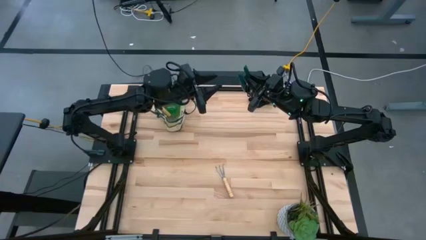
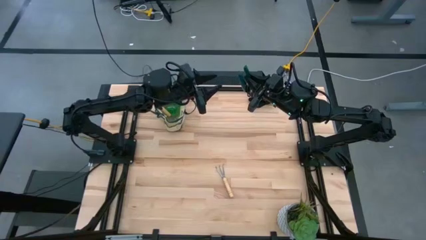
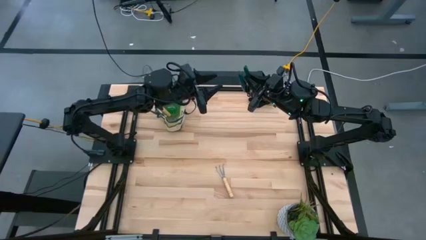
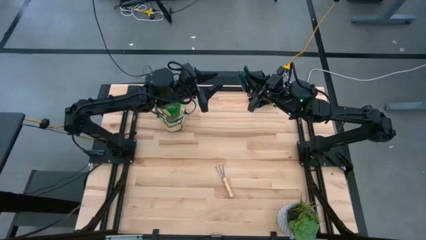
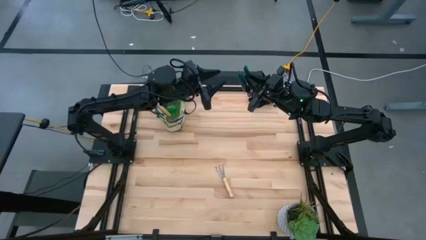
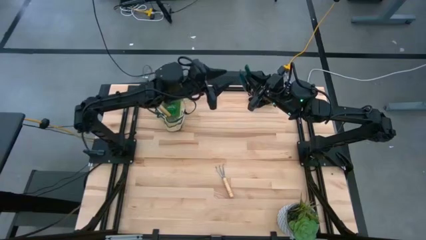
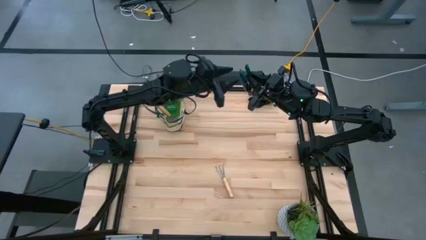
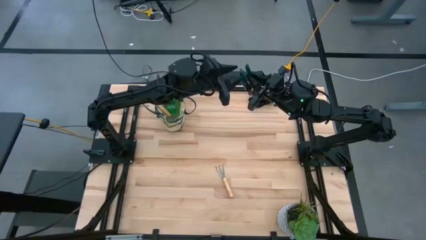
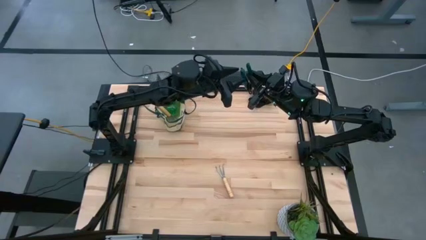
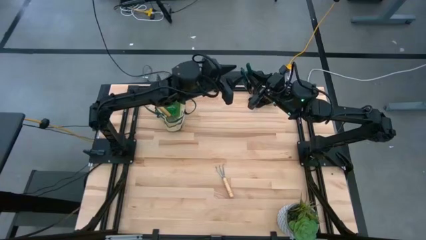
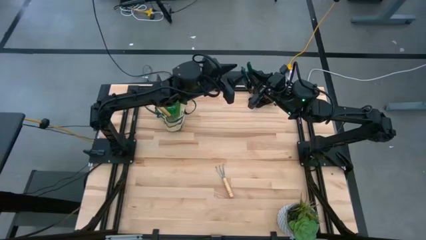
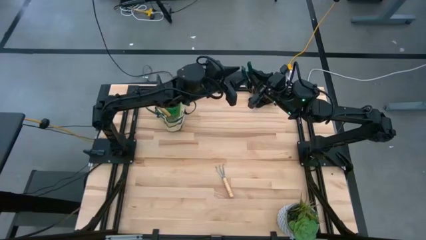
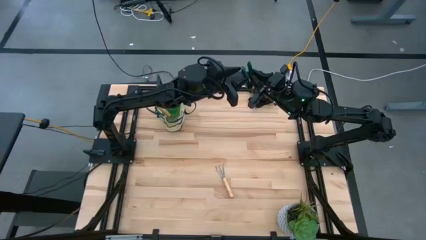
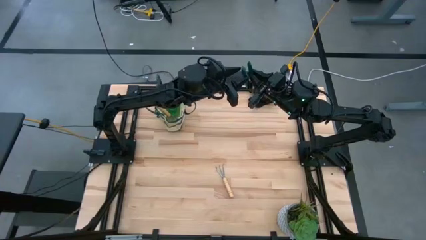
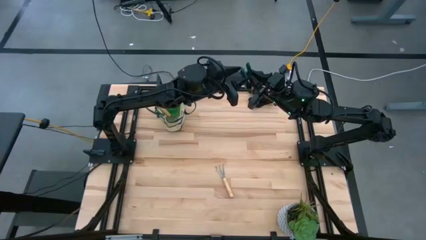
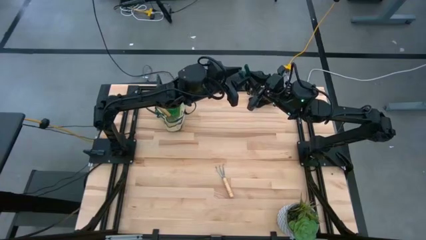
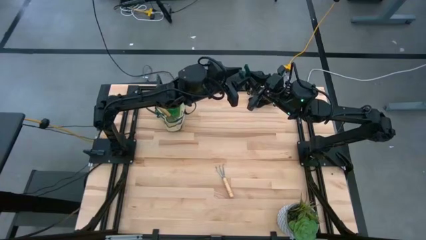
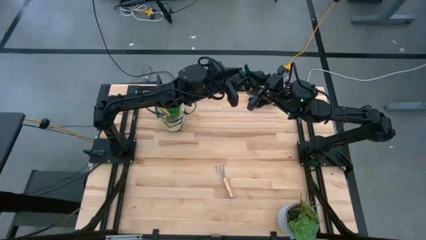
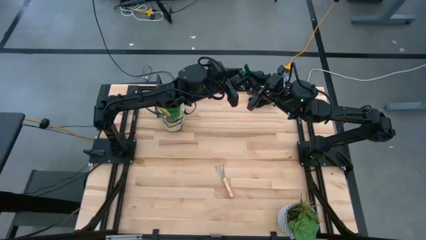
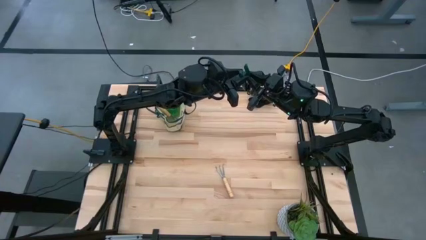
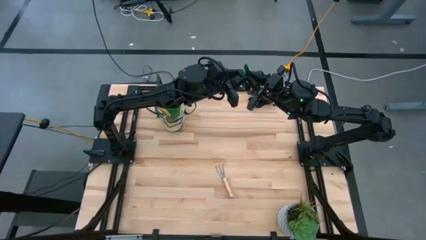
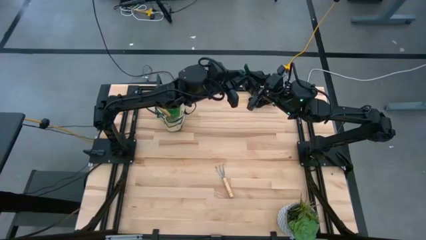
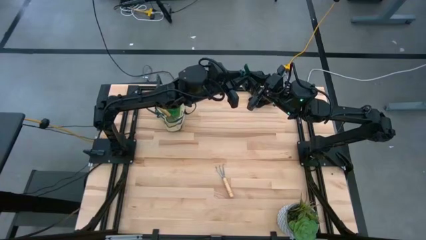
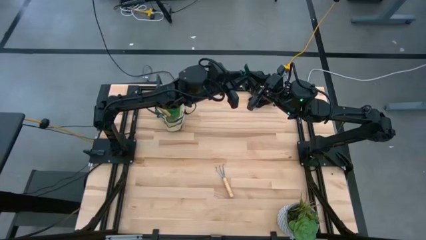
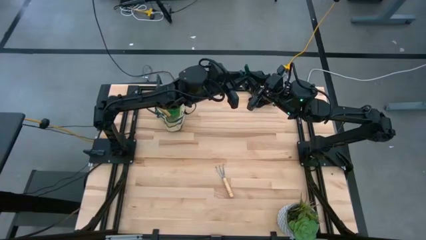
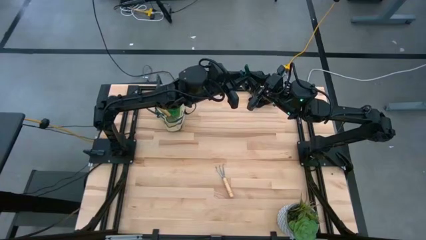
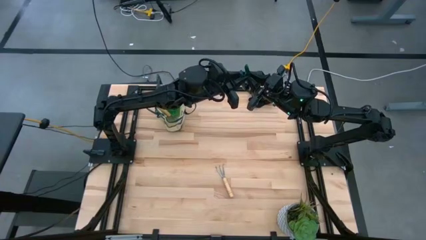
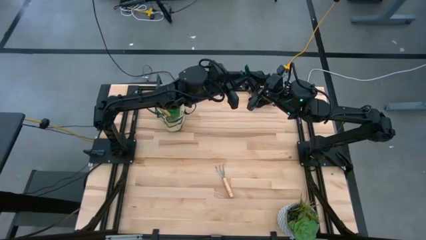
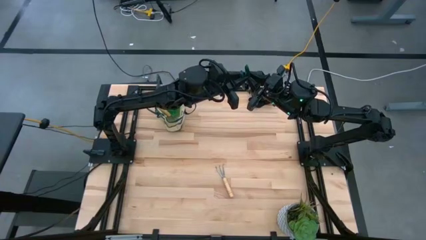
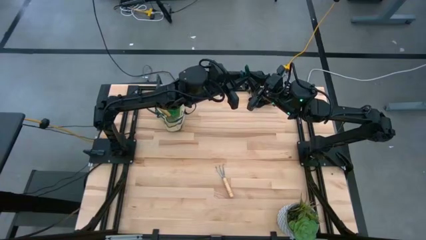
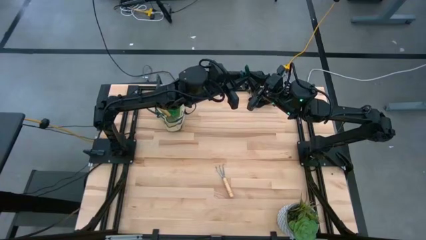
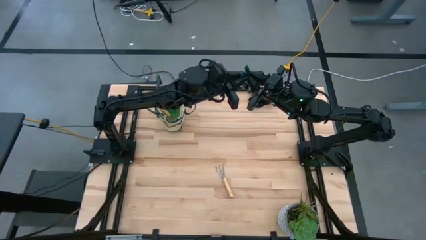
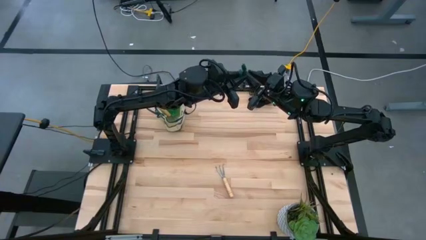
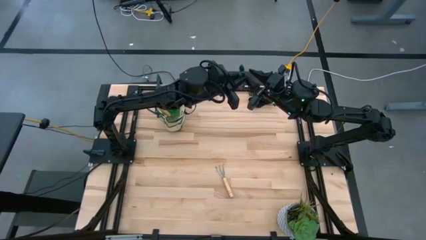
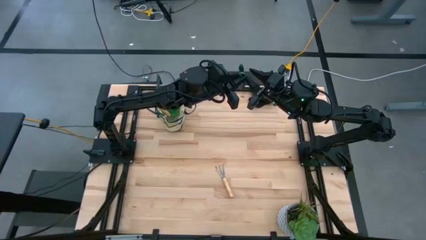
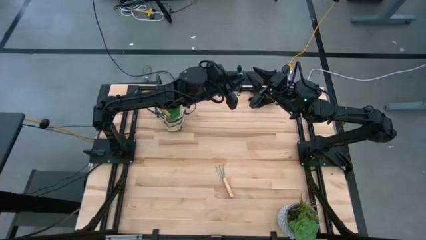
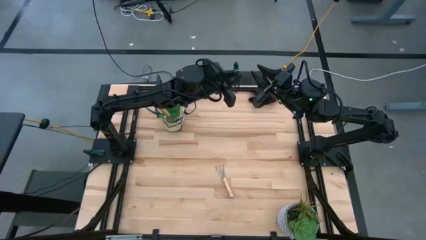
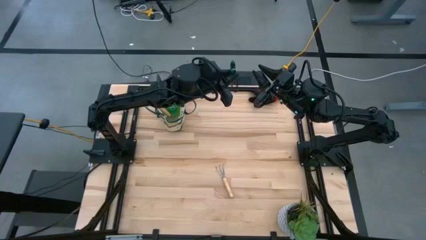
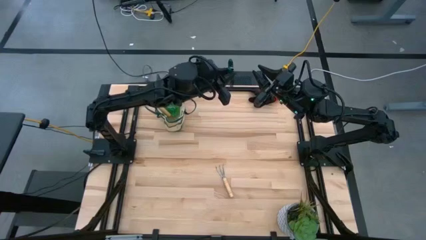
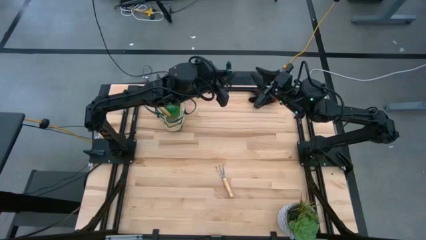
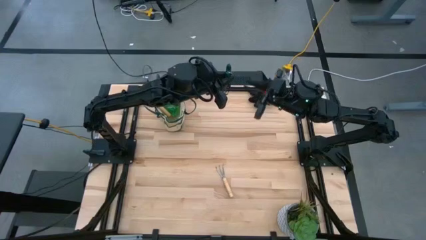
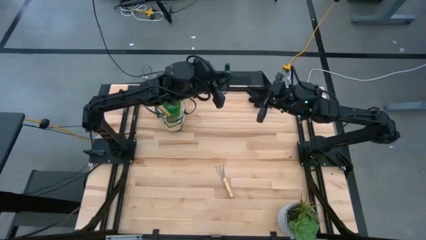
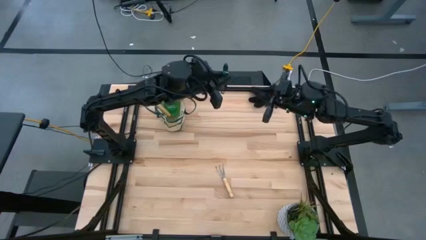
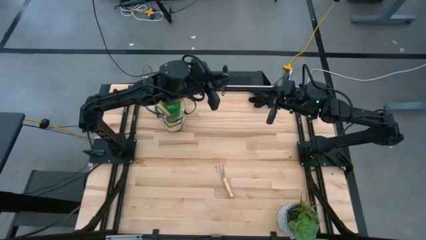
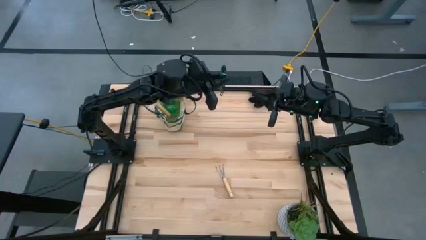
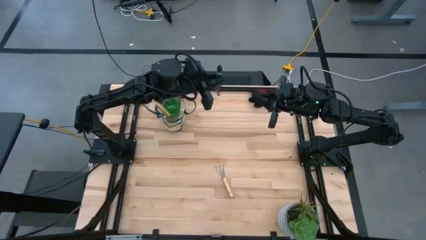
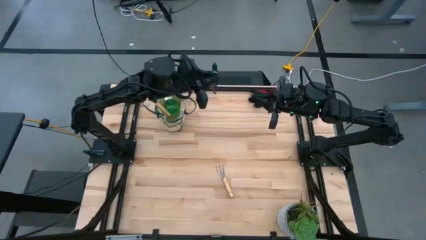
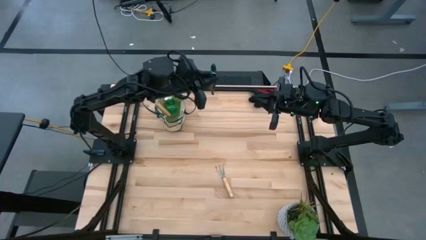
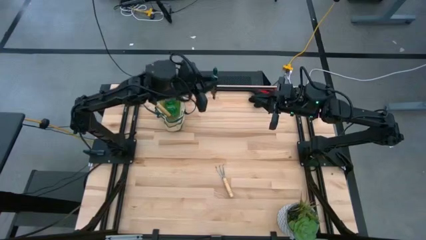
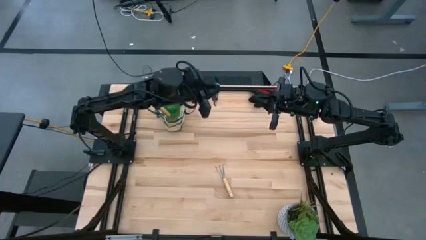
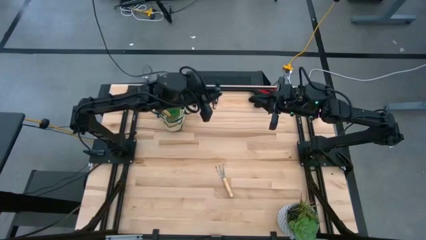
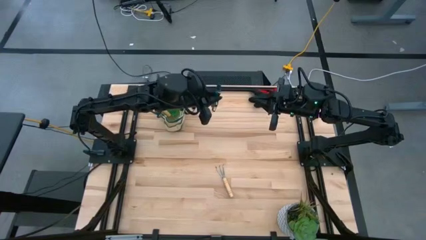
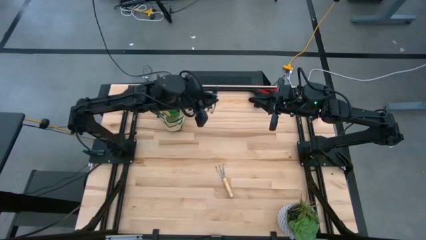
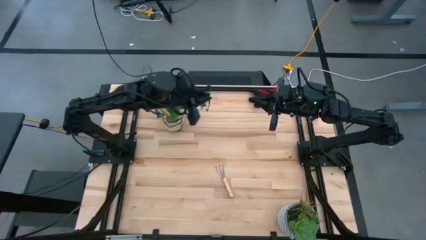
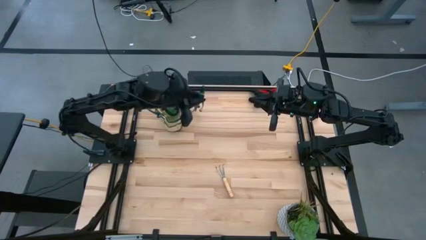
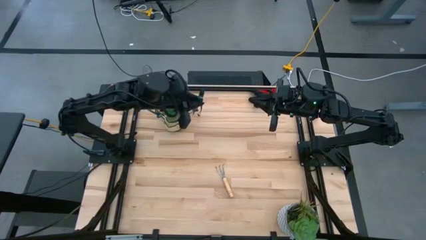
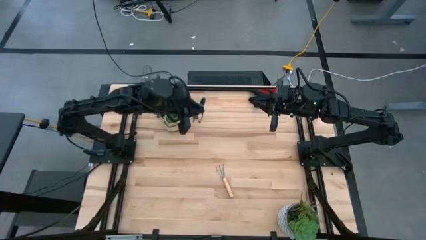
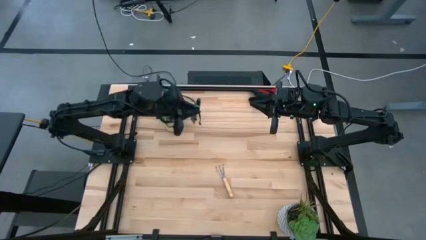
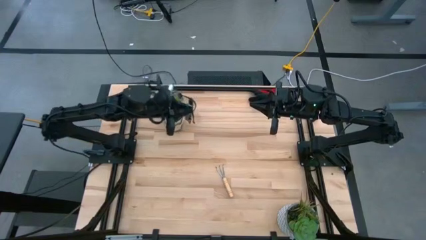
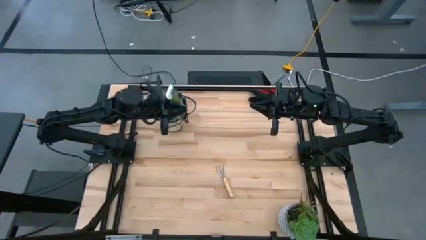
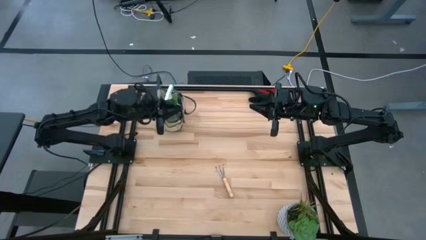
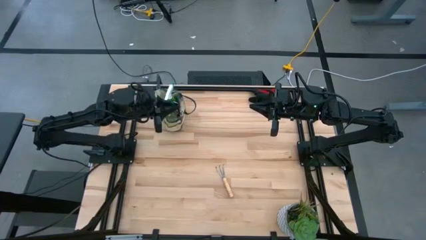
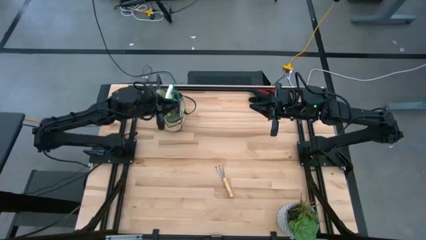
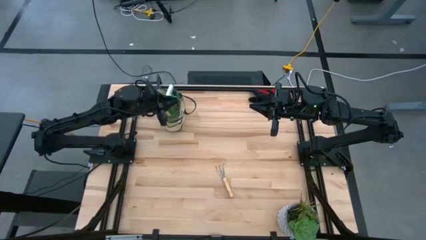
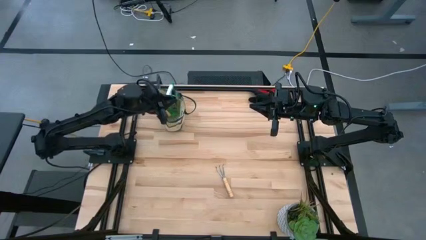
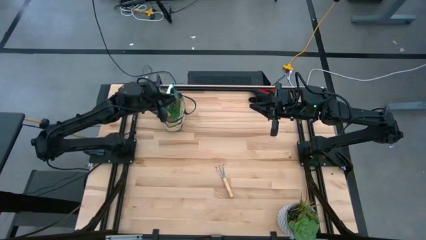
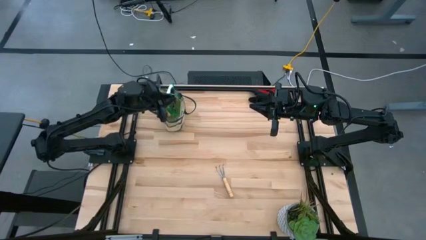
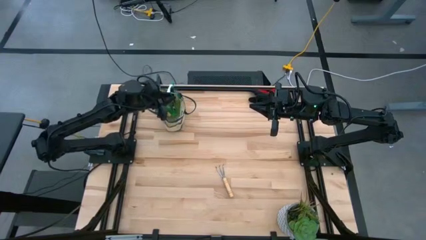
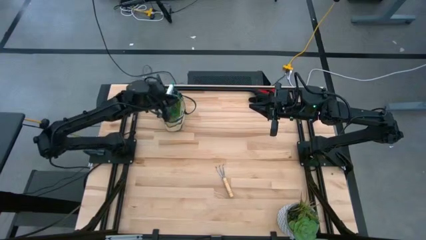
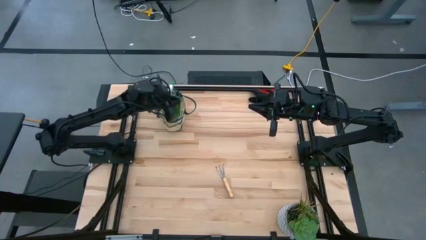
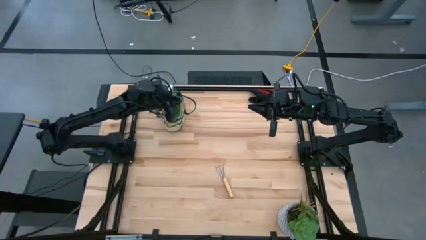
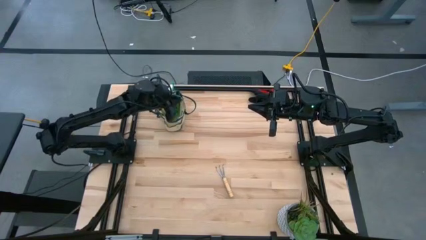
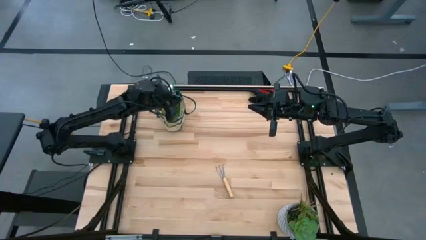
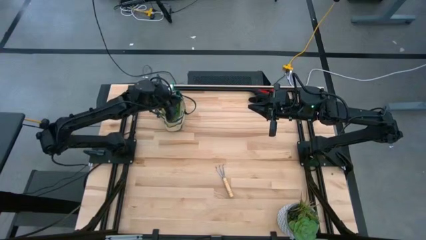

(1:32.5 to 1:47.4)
Task: Pick & Place Garden tools in Gardening bag
Put the dark green shears into the gardening bag
